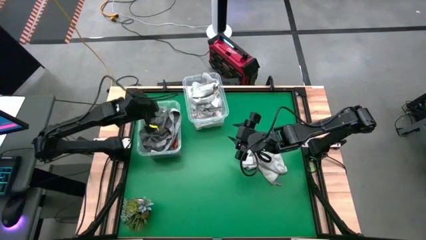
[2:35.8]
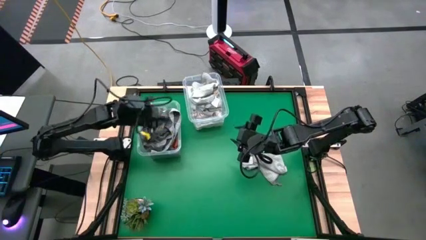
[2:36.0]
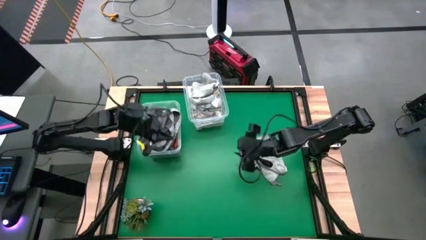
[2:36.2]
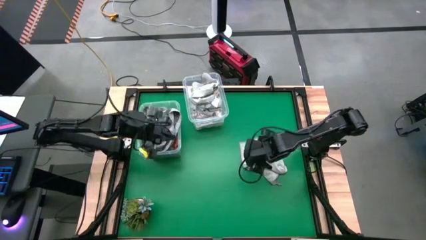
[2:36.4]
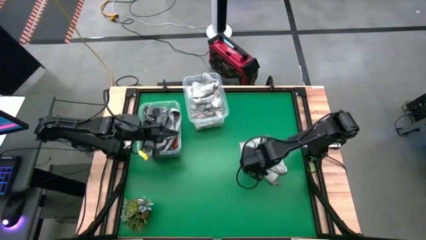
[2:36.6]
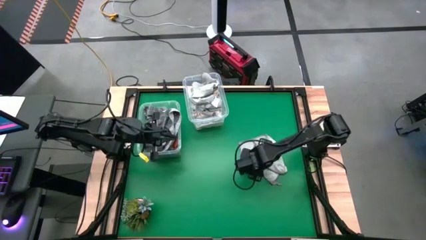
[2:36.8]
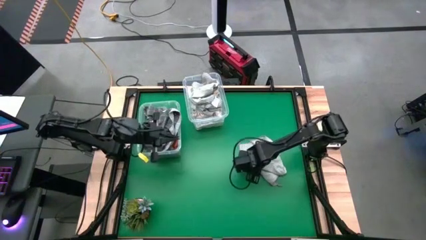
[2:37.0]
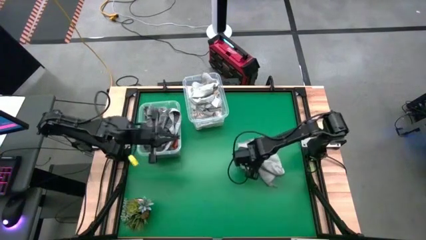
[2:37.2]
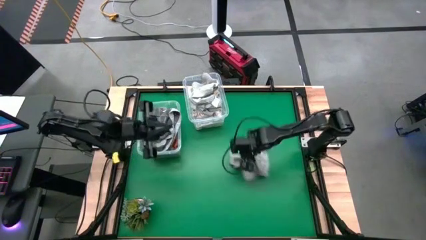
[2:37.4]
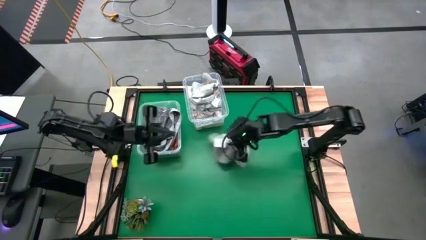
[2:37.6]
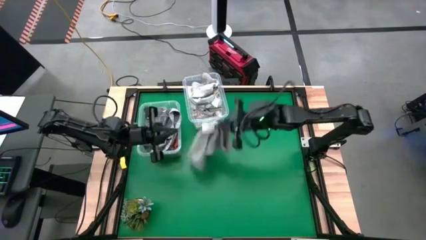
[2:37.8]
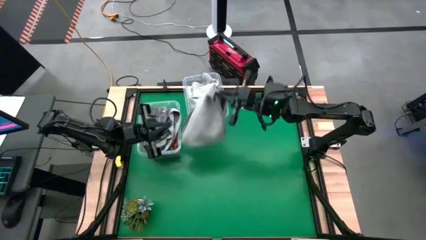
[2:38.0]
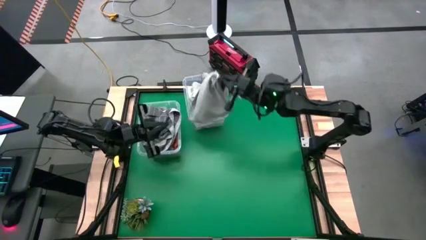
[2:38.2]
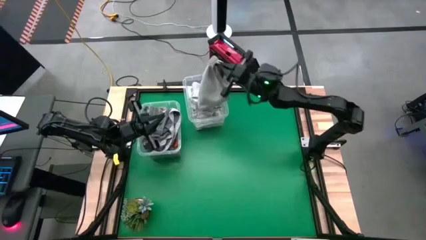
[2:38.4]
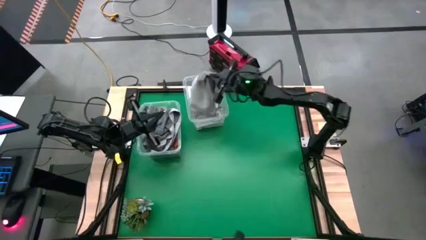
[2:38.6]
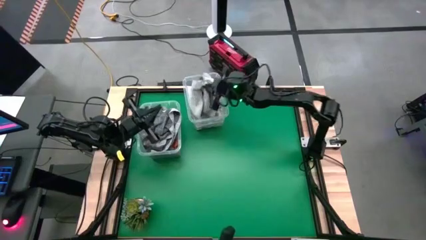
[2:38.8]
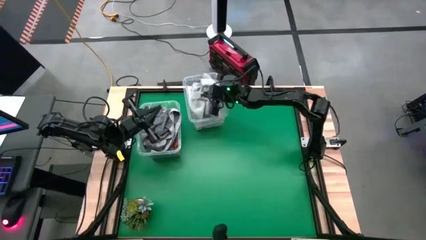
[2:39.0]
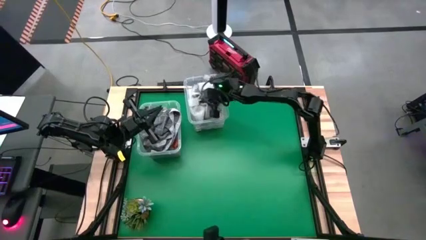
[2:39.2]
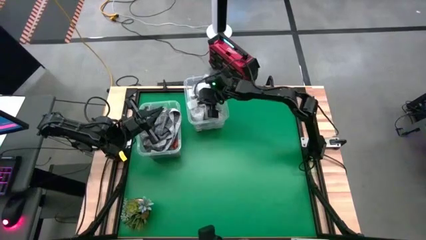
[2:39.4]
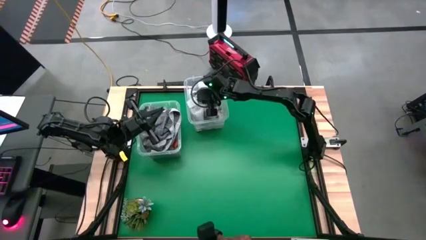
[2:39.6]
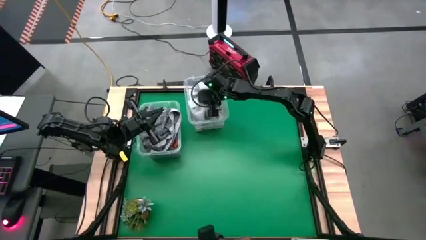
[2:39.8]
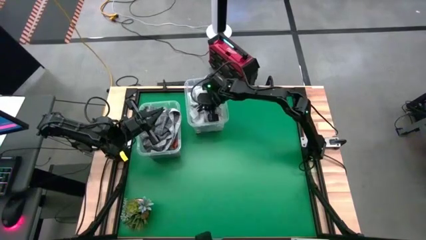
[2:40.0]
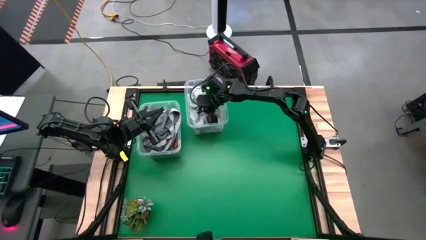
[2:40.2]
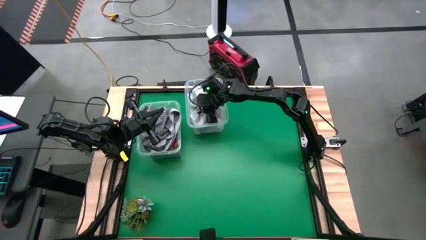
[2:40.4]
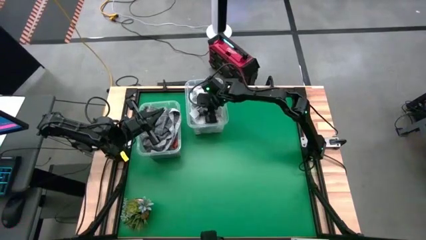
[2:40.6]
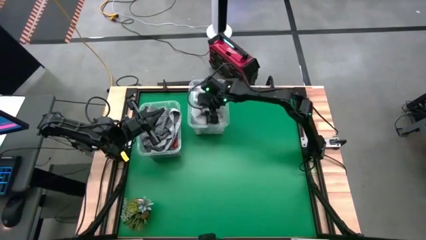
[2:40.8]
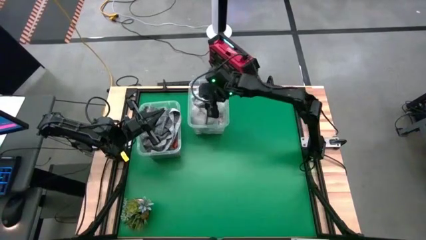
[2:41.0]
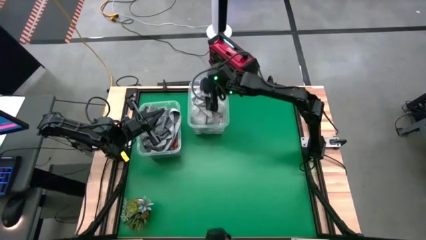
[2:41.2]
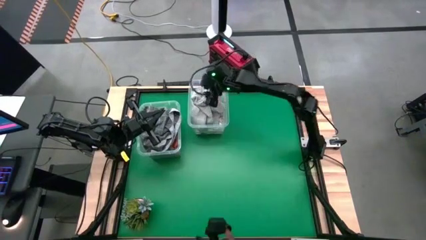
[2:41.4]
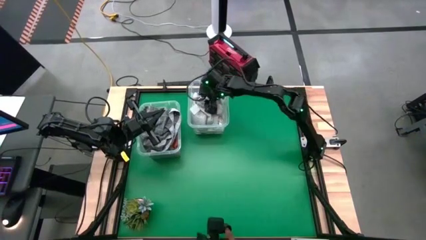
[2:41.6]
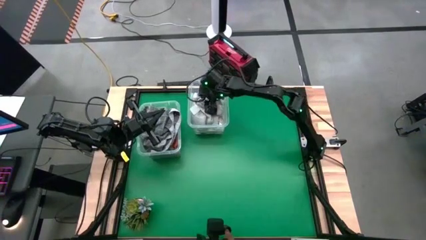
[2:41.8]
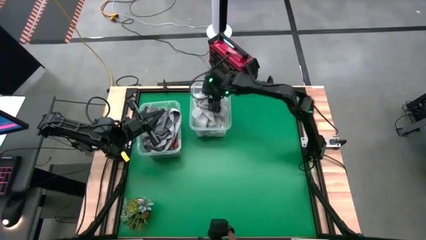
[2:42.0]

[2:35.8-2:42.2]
Task: Sort towels by color in basket
Put the light gray towel into the right transparent bin

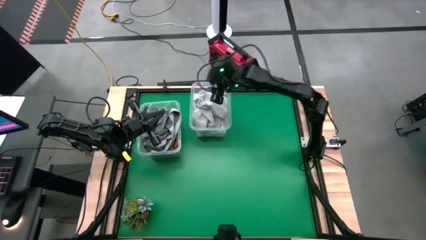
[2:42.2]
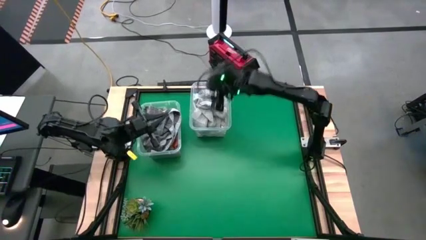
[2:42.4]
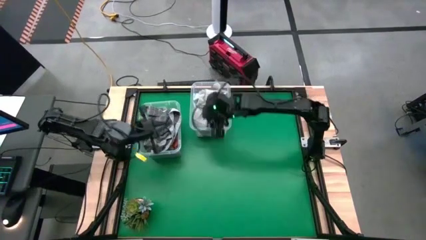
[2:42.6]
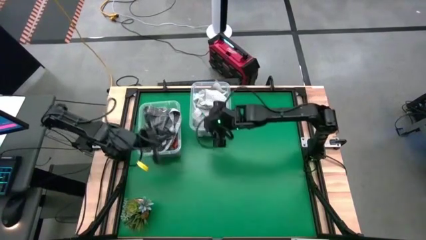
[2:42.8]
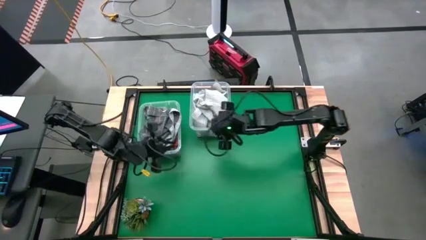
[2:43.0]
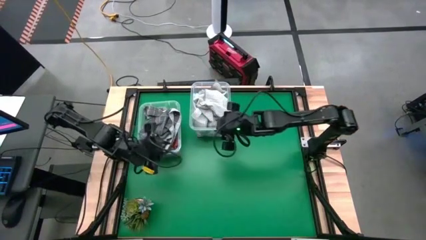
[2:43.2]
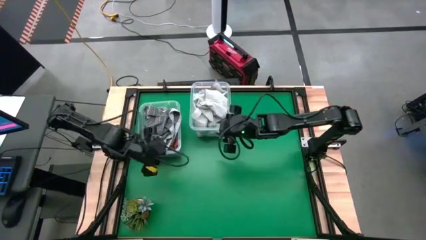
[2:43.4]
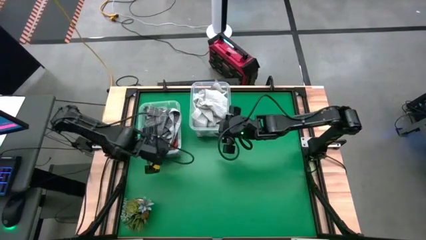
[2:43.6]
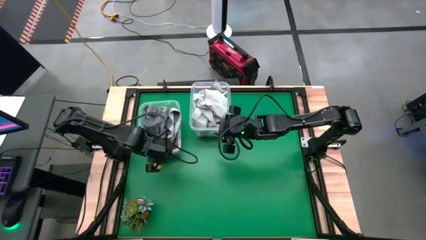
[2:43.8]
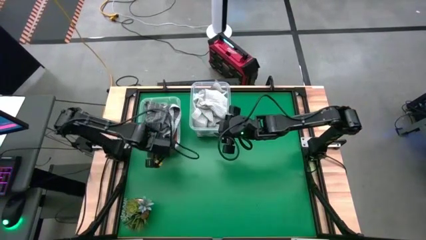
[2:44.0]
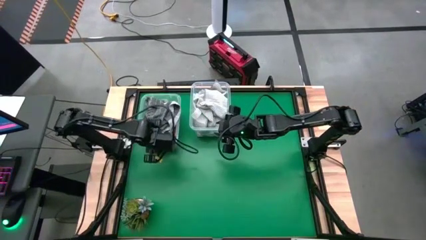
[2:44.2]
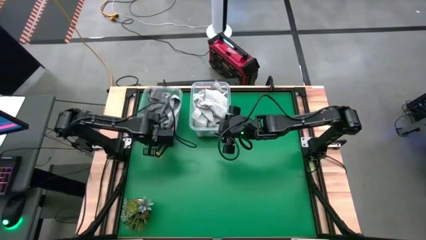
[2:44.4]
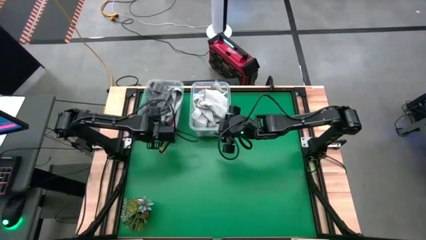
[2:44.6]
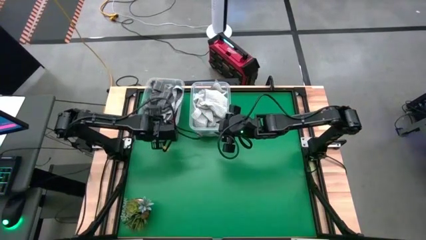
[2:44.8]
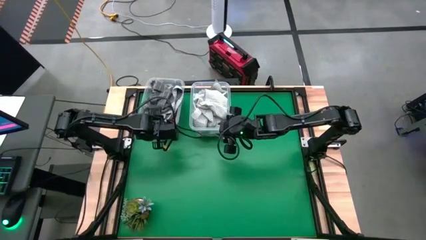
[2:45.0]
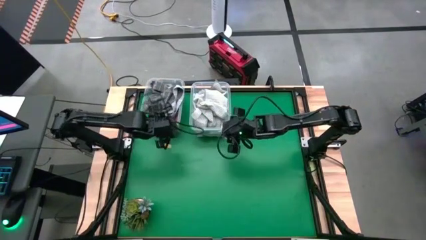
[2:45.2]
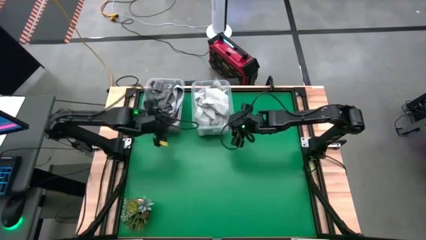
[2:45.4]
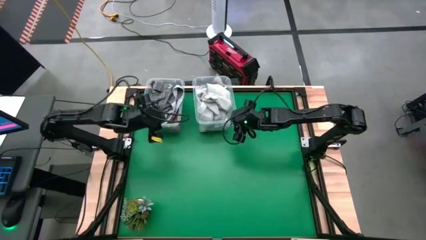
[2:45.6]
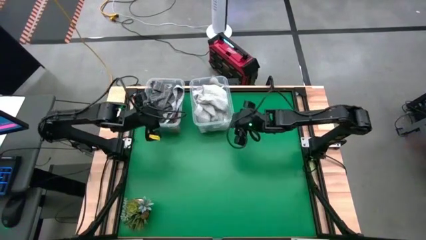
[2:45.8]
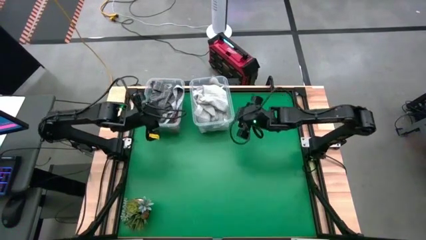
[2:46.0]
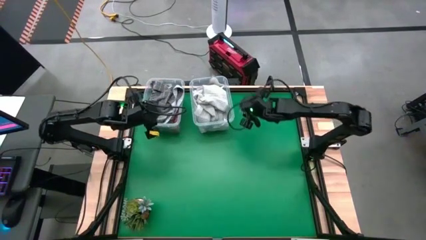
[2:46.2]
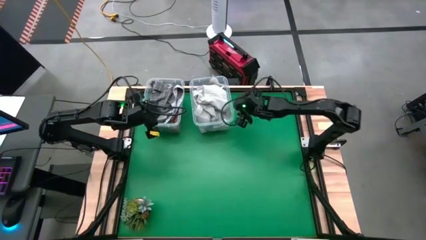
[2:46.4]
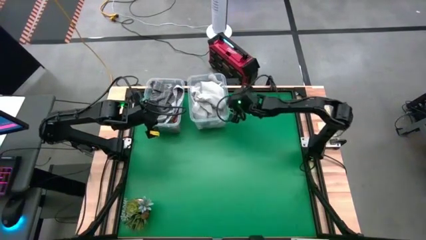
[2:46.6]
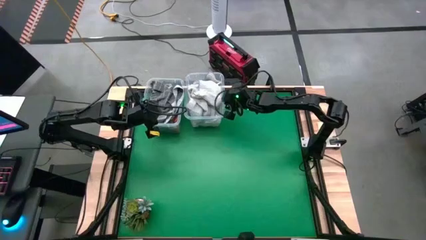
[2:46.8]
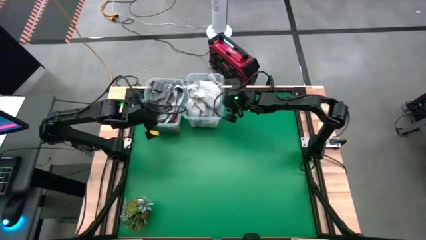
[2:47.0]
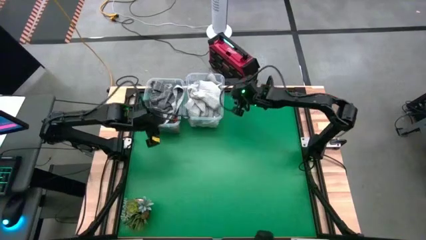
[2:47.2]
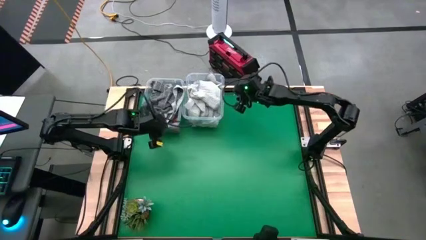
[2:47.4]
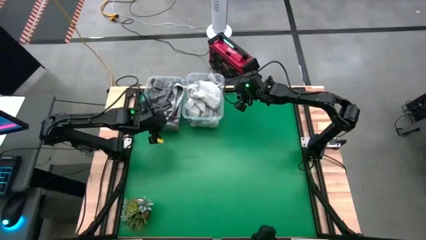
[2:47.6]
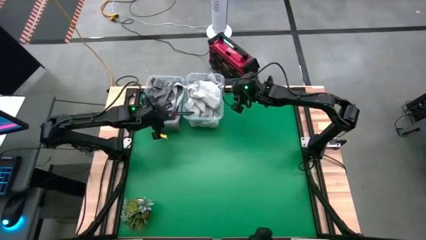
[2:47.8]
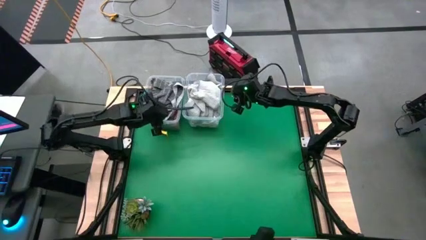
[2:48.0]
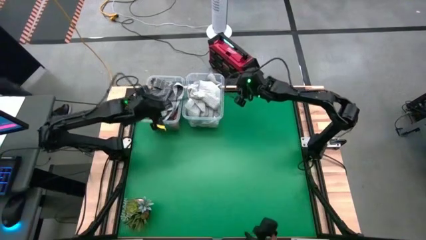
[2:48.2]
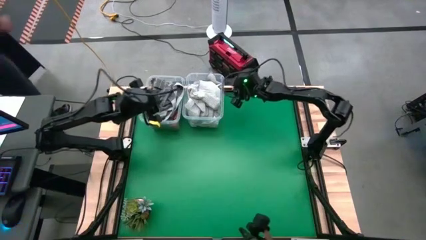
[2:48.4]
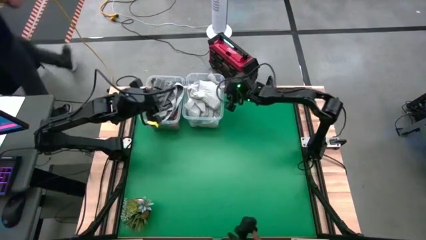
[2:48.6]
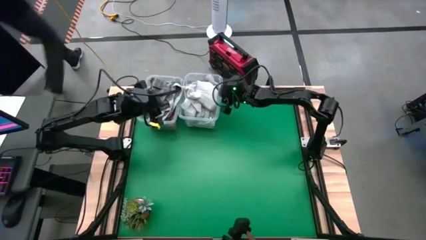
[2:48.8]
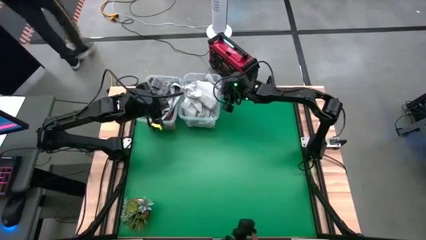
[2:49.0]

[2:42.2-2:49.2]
Adjust the transparent bins

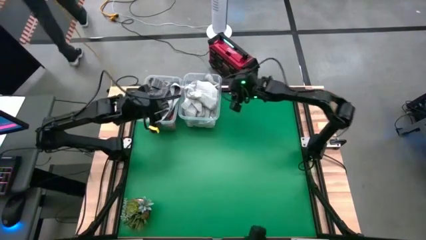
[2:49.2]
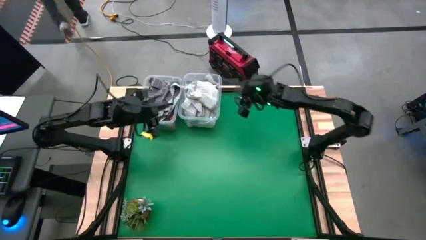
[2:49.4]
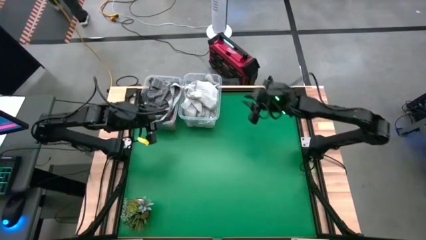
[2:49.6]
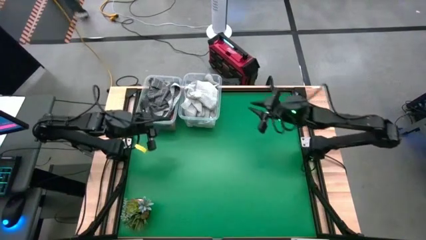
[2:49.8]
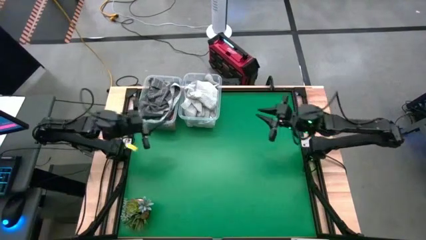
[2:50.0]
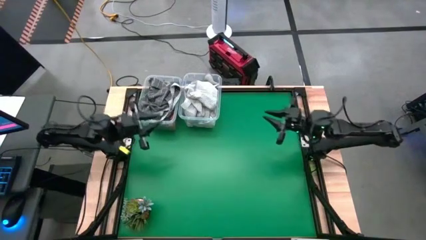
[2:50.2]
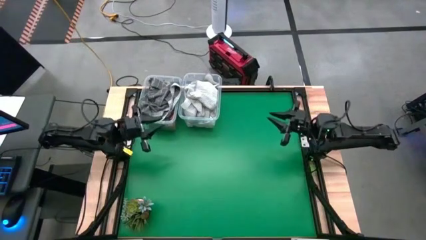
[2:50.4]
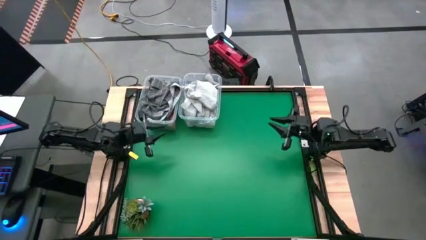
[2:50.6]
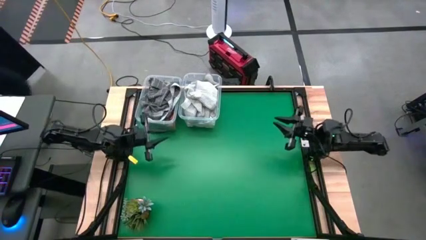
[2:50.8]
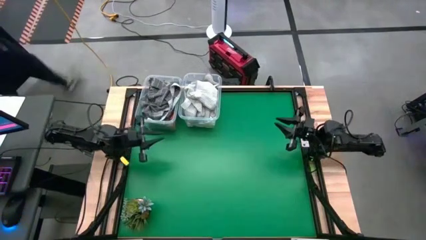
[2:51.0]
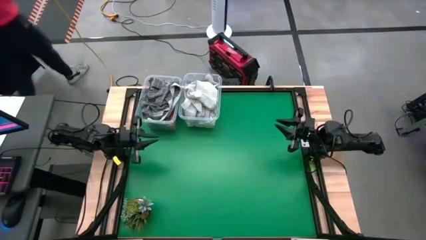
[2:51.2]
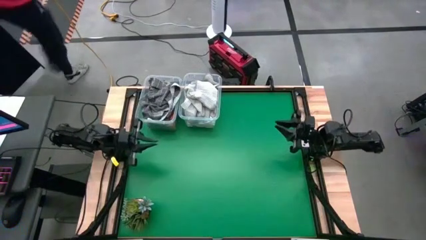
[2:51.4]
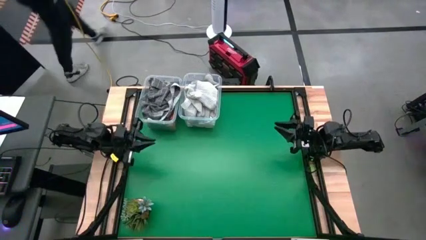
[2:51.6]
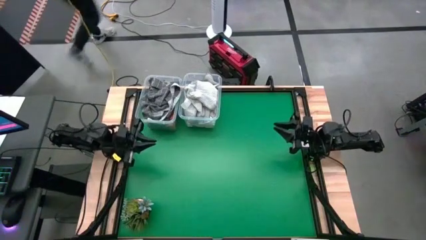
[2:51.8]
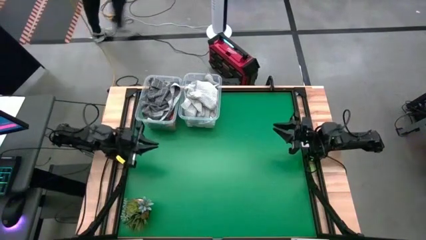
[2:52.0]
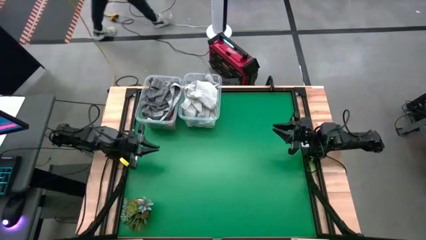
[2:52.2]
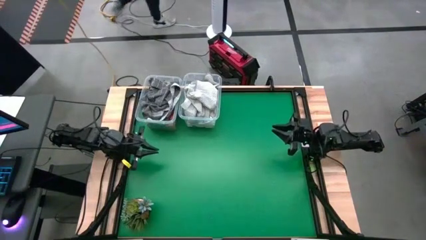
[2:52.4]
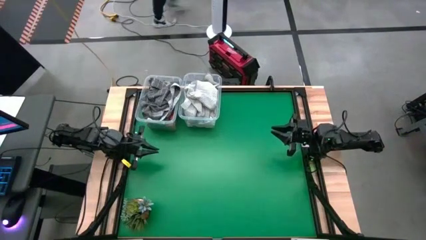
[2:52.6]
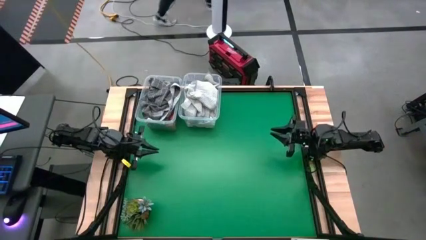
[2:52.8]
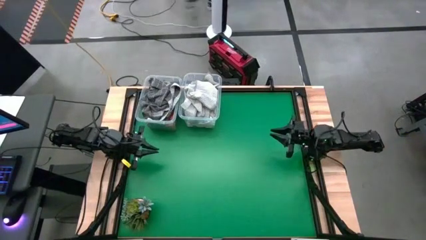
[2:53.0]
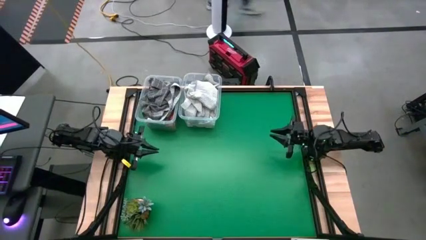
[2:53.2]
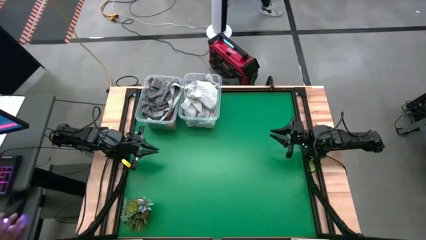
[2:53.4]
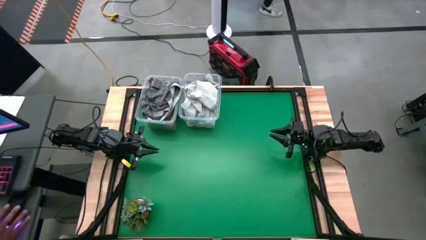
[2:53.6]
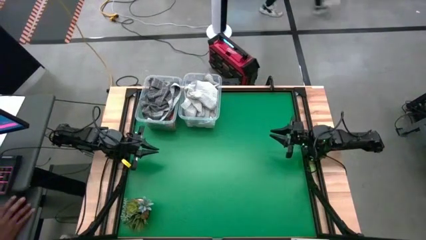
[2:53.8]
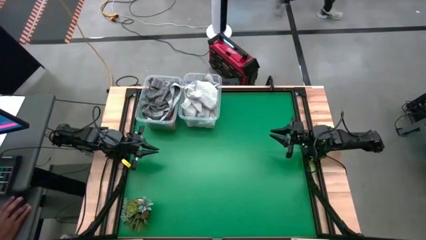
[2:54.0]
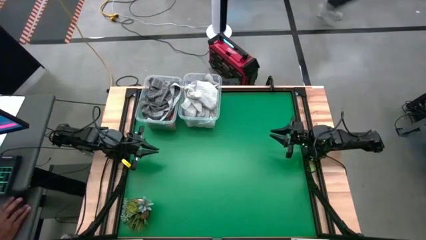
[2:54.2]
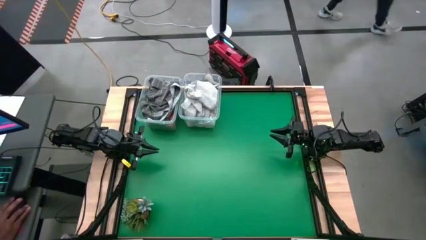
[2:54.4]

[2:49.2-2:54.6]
Return to Home Position
